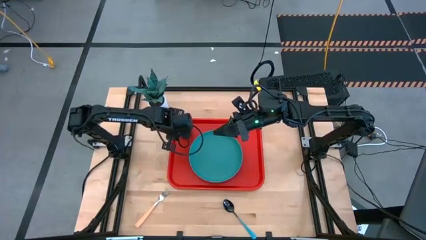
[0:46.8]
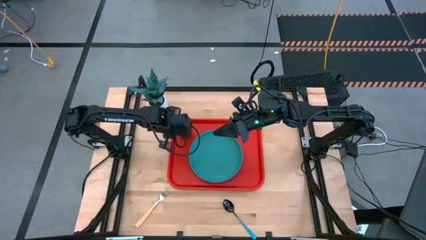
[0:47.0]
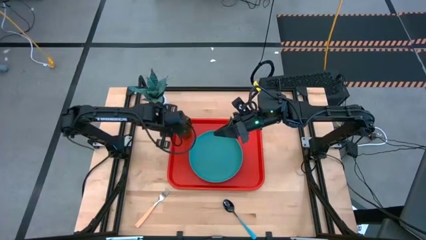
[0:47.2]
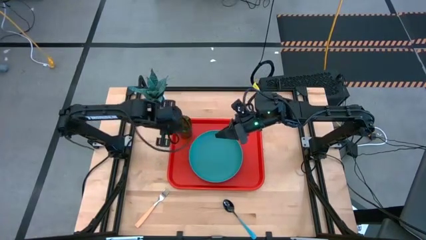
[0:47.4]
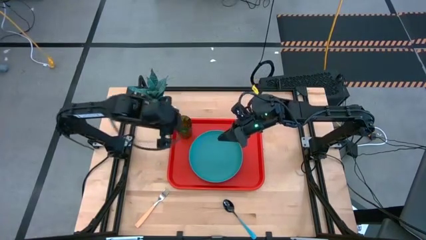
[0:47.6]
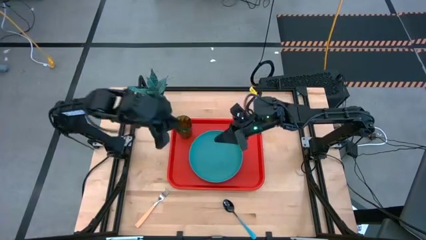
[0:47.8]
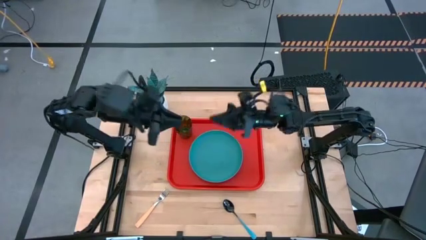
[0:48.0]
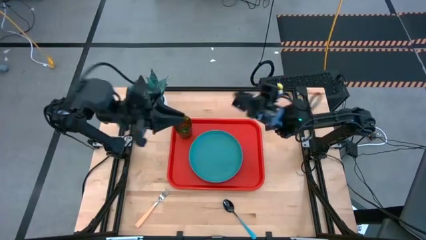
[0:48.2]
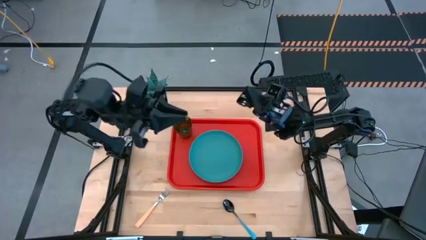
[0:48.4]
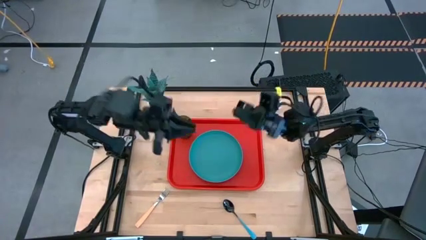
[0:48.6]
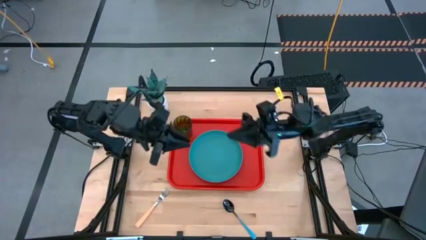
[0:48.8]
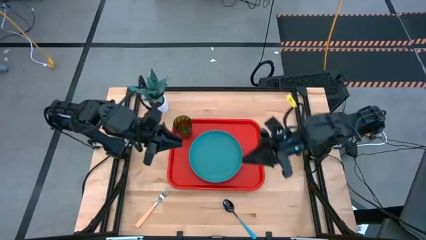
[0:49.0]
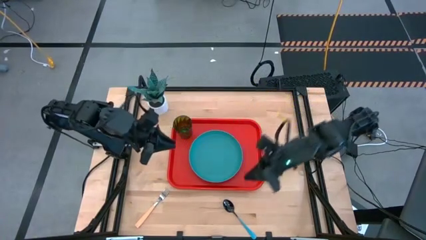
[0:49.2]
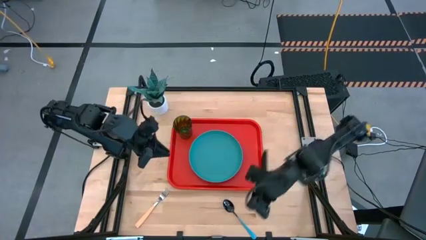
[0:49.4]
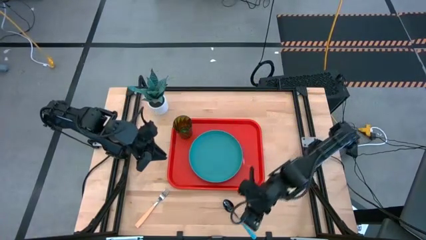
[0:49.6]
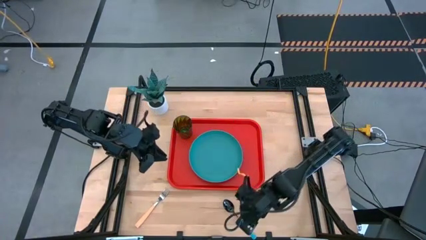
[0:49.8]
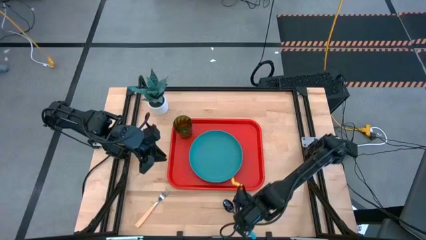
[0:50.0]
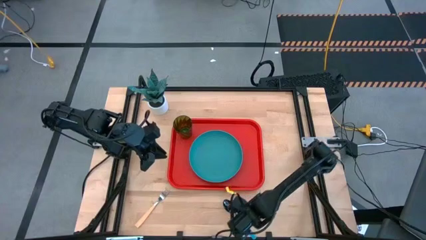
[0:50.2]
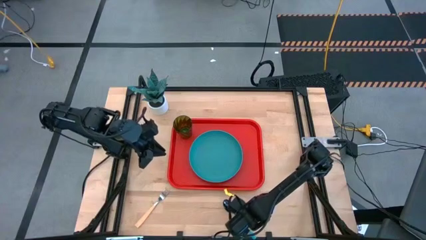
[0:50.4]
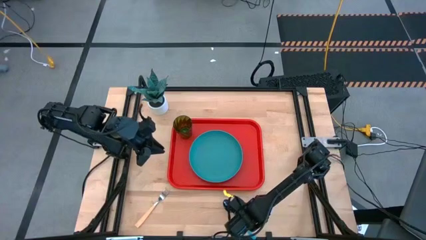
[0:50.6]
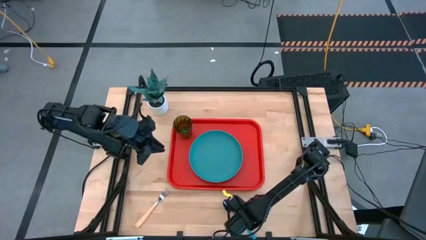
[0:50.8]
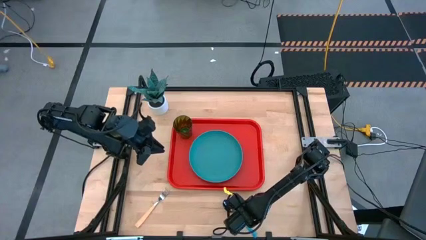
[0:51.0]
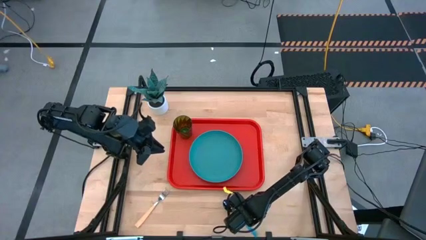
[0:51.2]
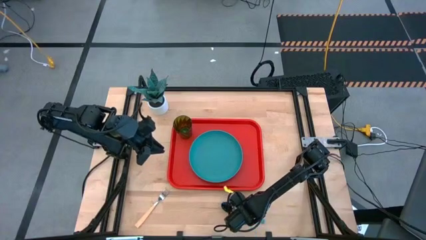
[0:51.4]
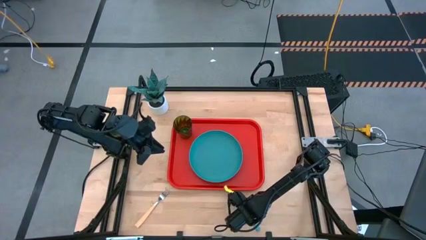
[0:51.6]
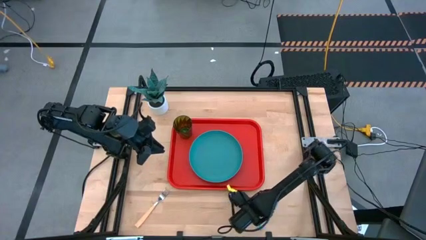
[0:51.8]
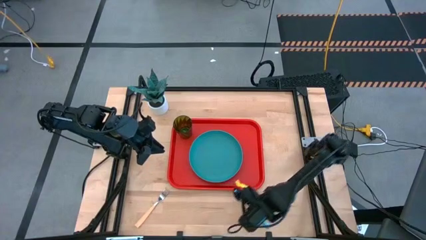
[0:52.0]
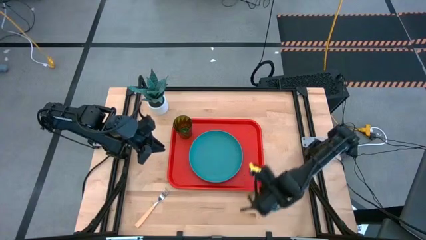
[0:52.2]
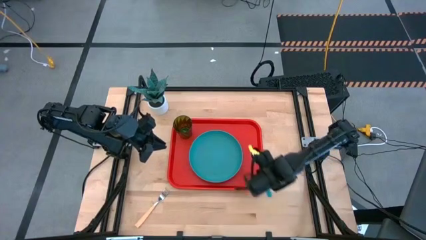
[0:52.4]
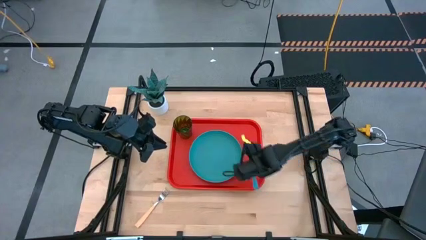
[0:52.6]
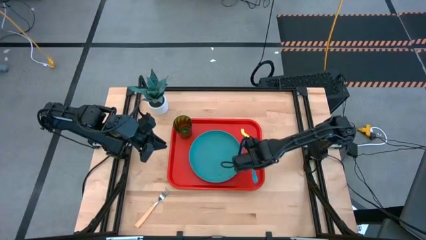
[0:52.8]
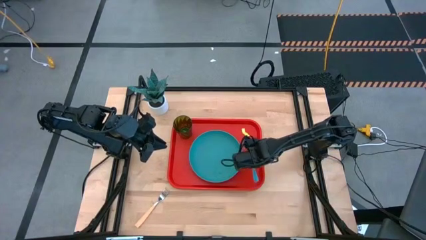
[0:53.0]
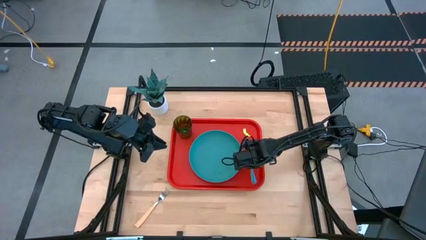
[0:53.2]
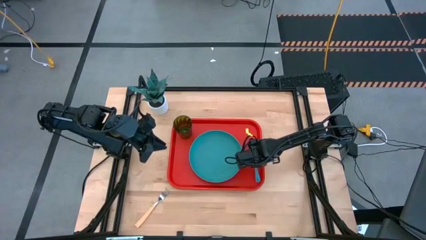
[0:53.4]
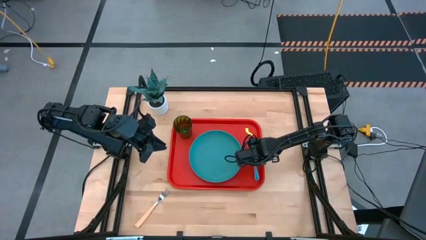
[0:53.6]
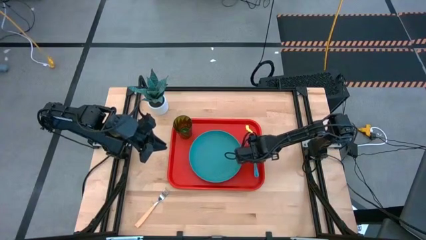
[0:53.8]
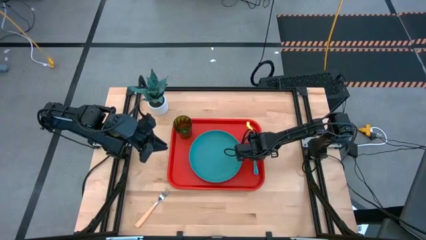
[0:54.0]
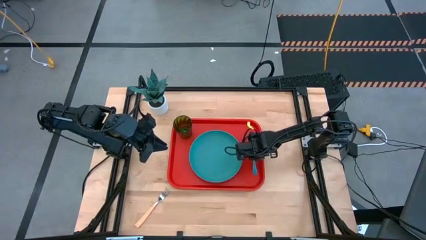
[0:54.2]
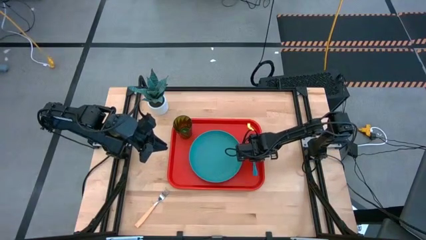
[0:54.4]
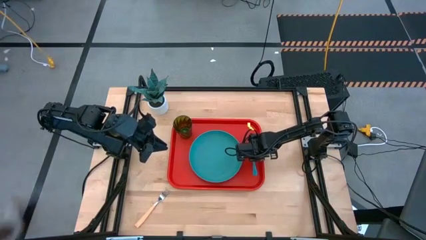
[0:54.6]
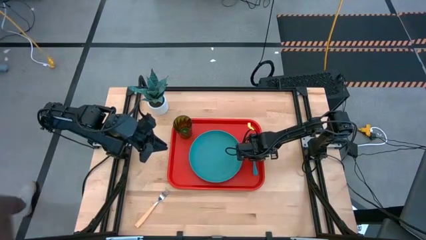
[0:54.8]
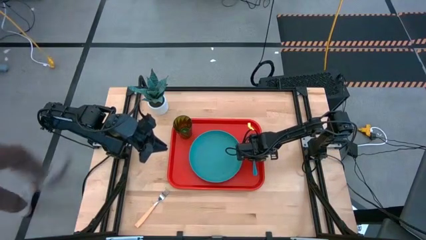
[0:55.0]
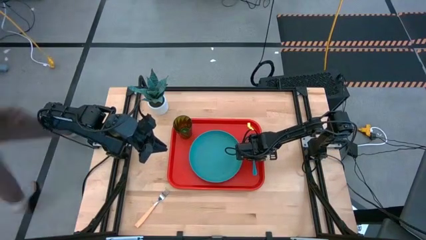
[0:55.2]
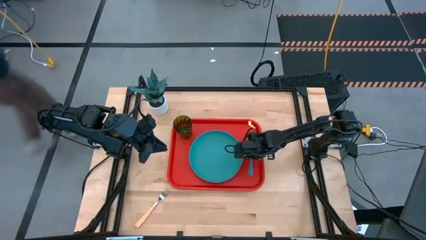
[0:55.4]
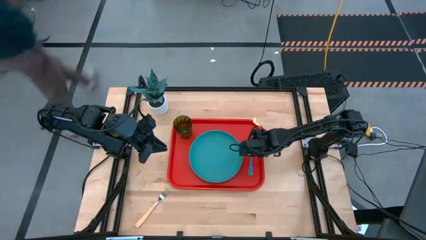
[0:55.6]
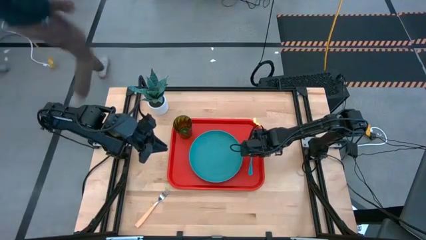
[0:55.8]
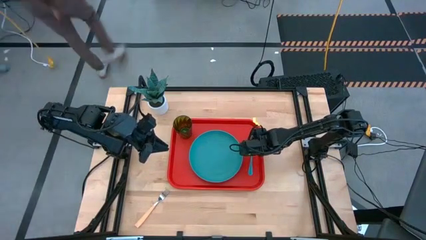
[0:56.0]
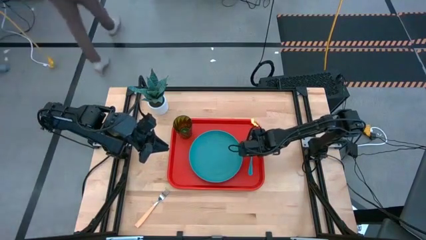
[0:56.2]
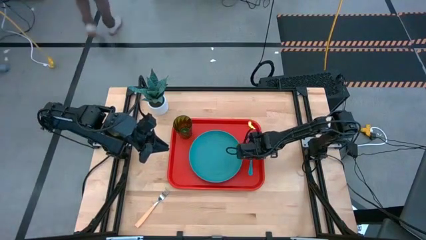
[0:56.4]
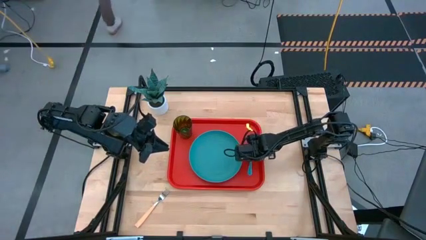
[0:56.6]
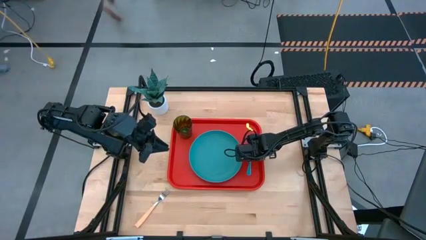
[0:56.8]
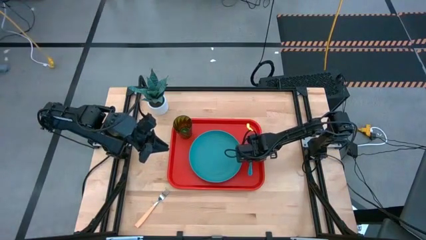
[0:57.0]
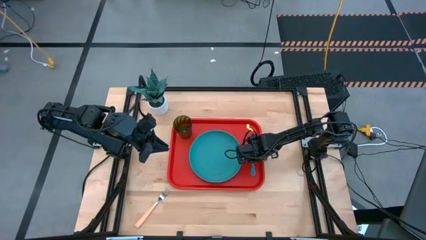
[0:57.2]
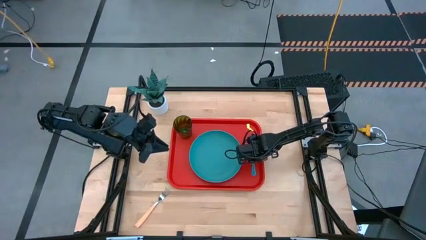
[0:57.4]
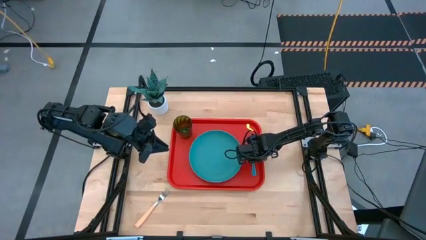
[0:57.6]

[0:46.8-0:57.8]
Task: Pick and place plate/cup/fork/spoon on tray
Put the blue spoon on the red tray to the right of the blue plate

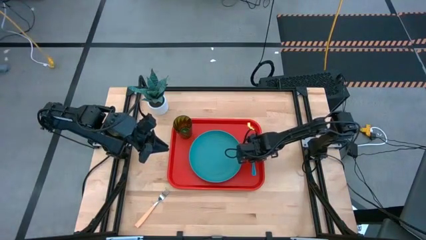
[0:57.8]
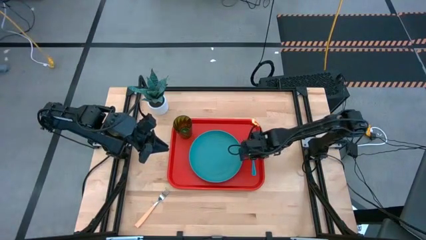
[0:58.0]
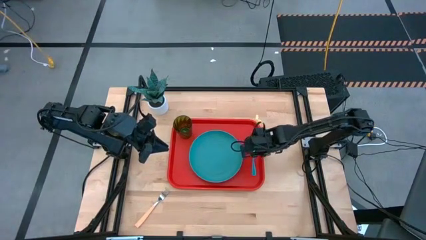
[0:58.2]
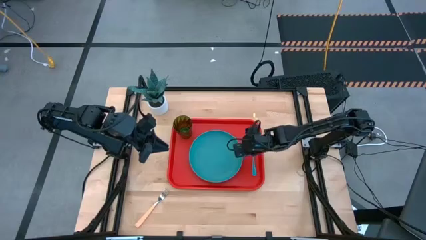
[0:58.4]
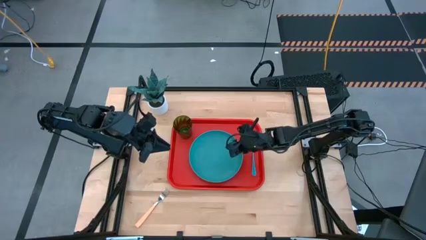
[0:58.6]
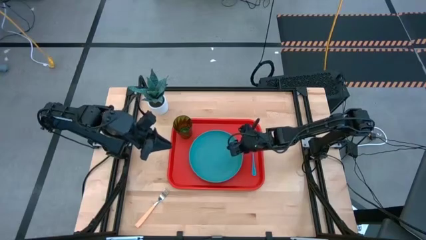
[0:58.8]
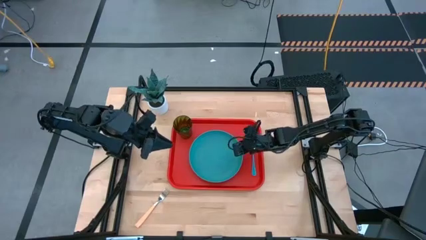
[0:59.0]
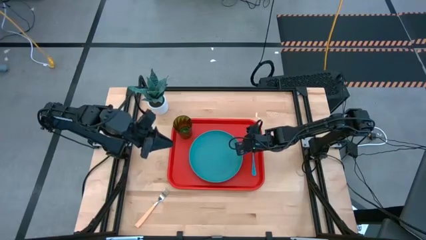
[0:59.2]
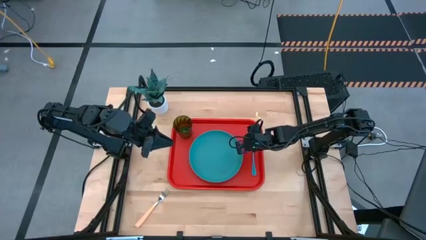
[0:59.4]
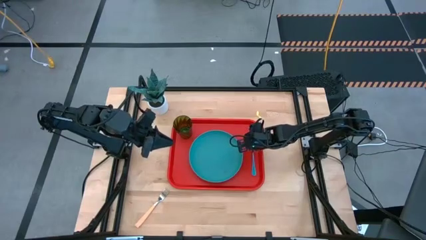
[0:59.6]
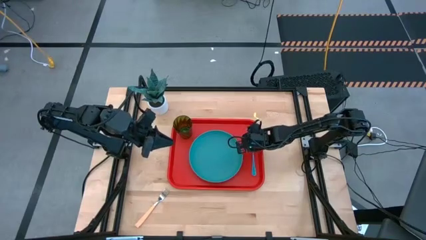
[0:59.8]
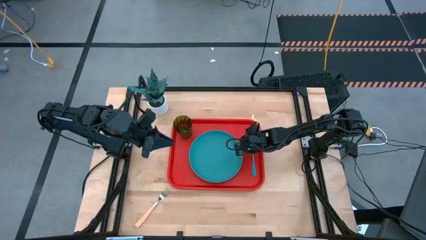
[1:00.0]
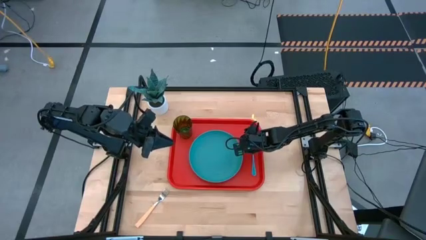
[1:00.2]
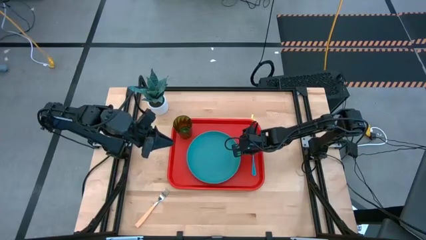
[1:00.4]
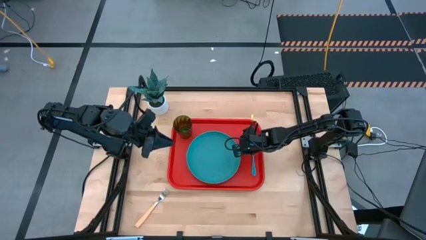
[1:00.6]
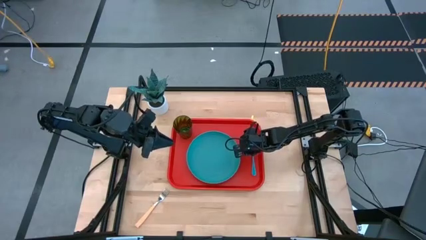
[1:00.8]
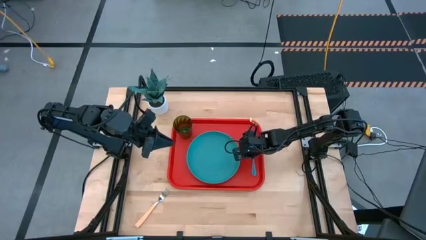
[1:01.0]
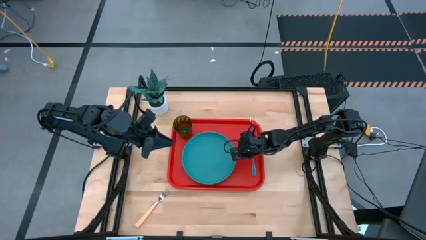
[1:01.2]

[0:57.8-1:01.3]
Adjust the blue plate

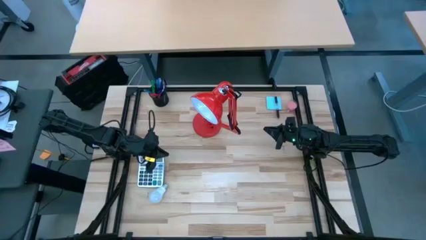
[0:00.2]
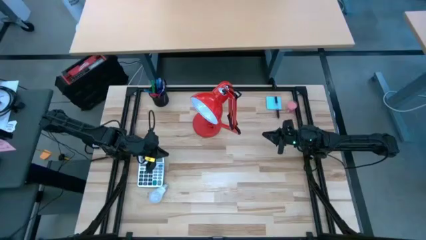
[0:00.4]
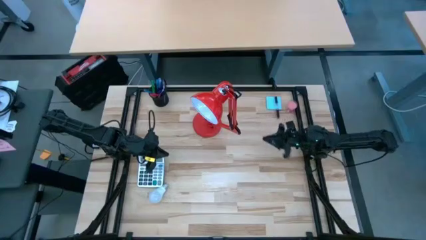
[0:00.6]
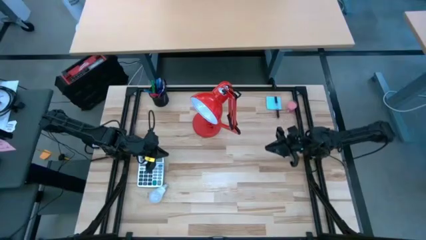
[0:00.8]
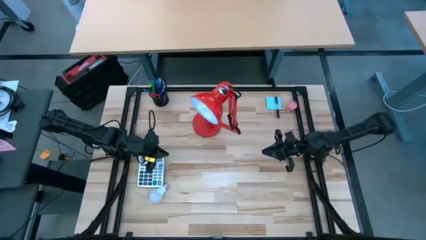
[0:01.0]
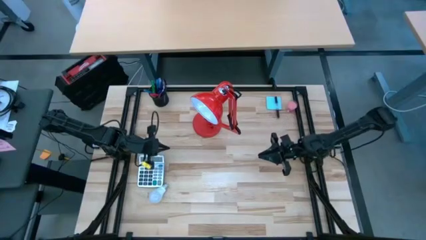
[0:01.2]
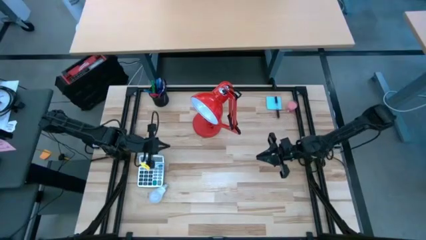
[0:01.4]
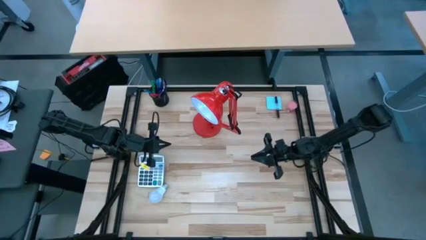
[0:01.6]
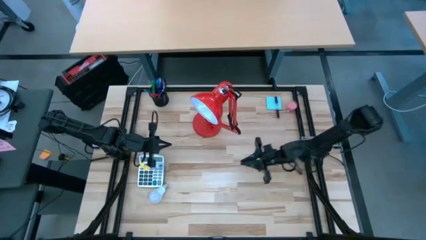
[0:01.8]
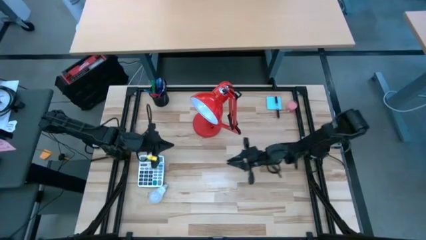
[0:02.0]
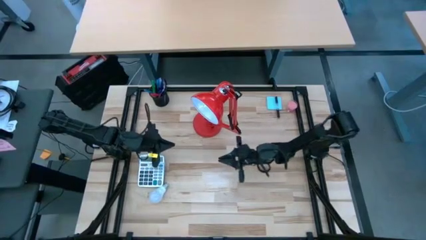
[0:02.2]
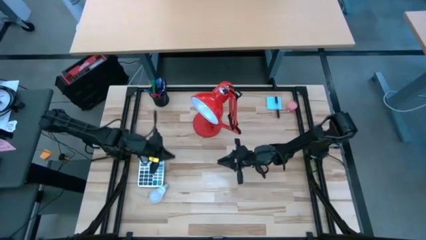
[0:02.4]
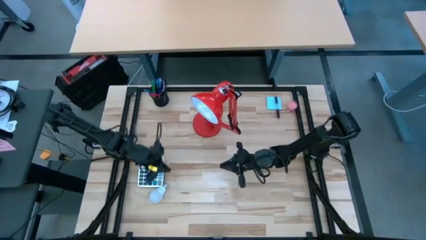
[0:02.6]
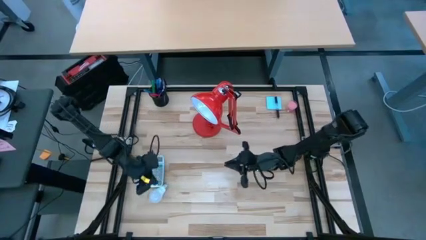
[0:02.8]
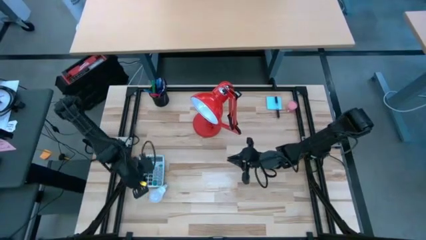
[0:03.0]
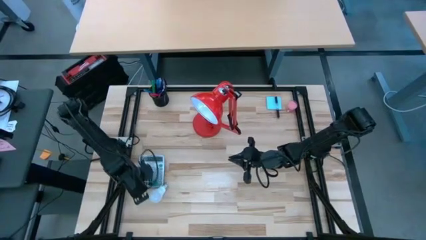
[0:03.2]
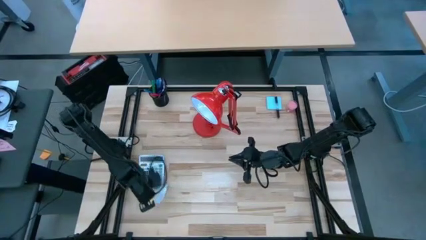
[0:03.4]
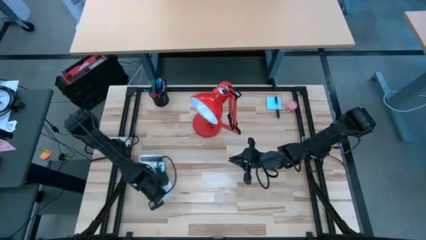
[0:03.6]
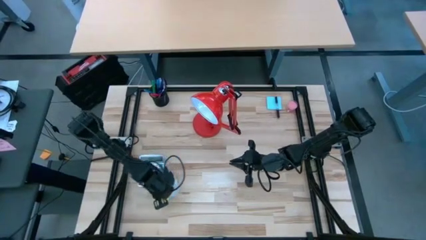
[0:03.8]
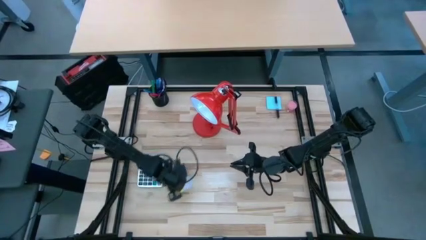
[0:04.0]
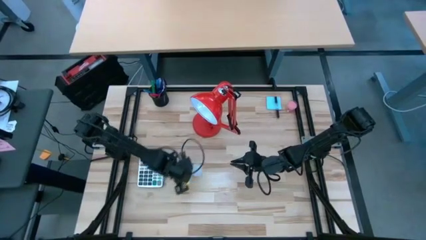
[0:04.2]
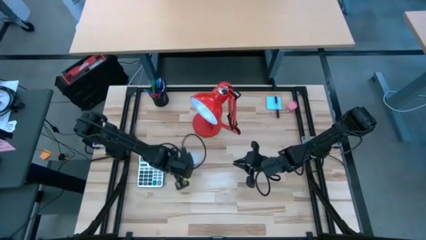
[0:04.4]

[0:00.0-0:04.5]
Task: Screw lightbulb
Prepare the white lightbulb
